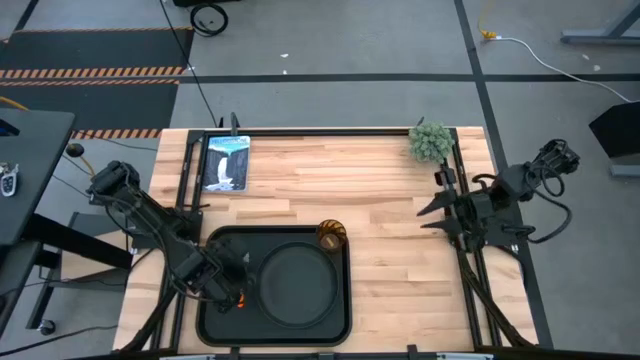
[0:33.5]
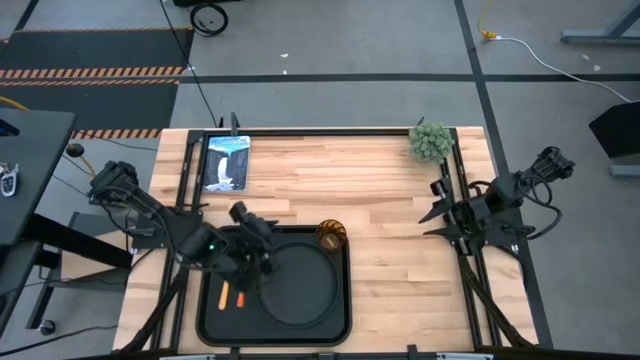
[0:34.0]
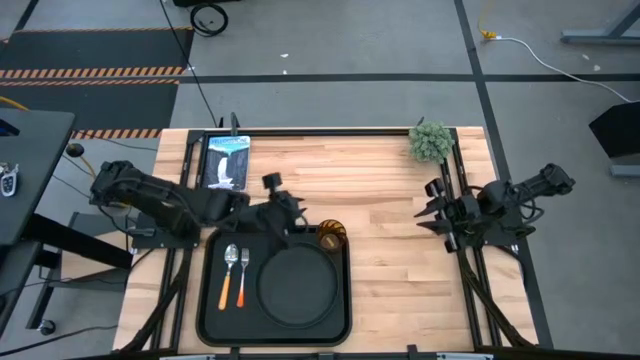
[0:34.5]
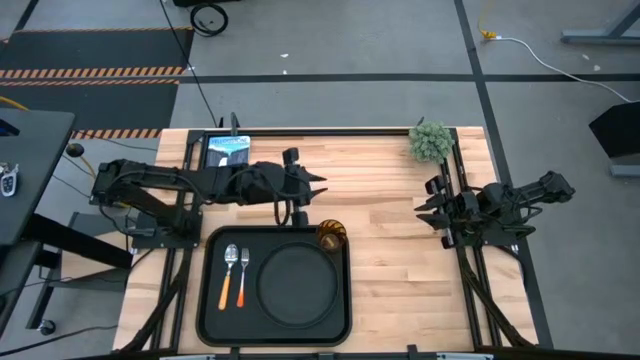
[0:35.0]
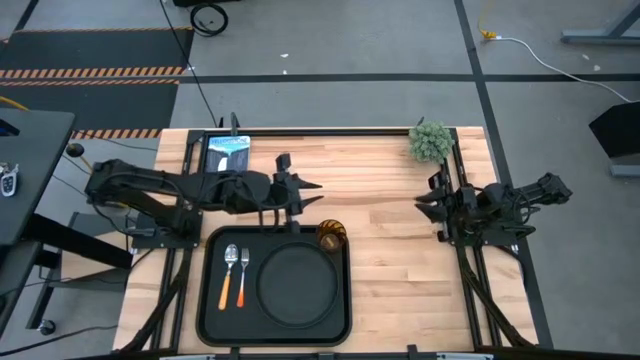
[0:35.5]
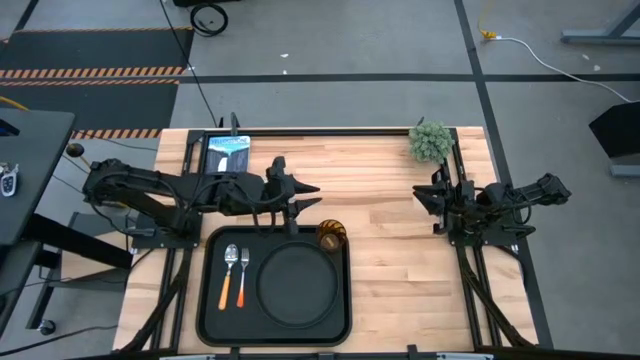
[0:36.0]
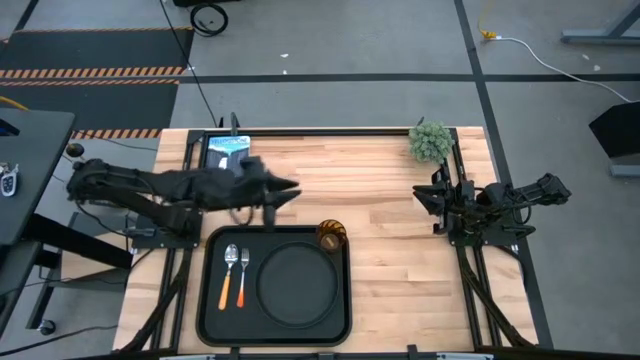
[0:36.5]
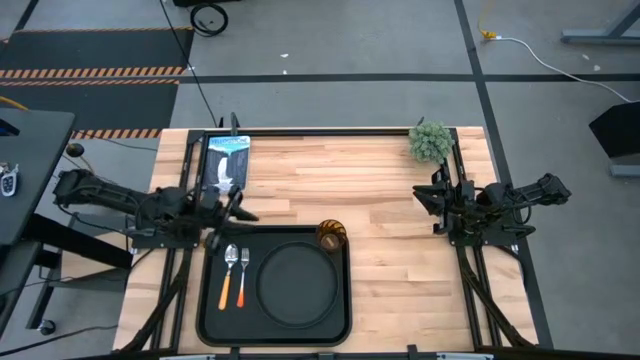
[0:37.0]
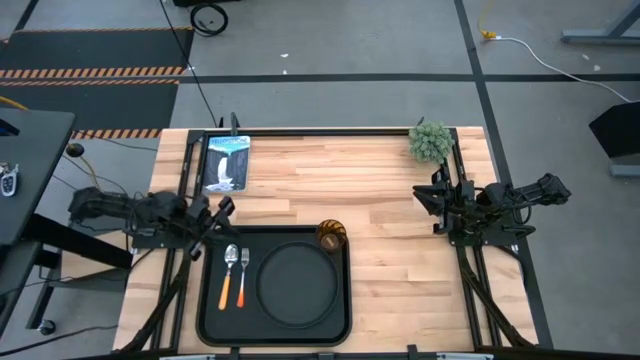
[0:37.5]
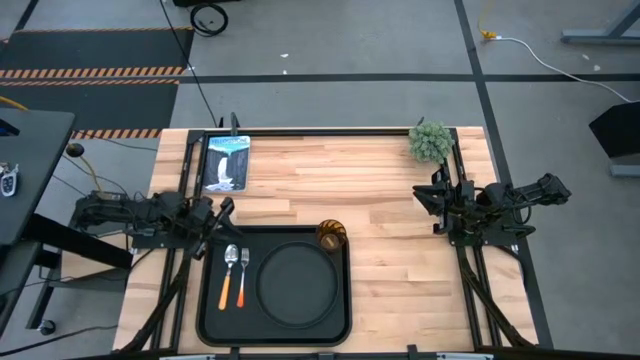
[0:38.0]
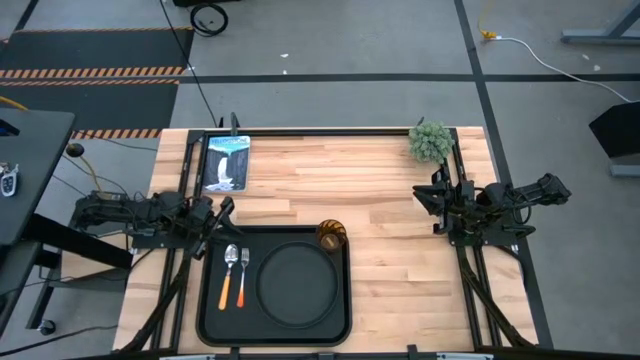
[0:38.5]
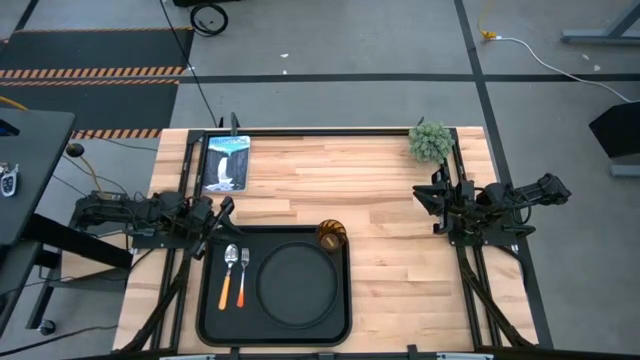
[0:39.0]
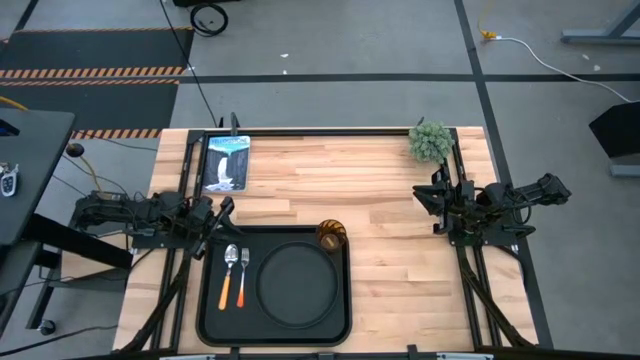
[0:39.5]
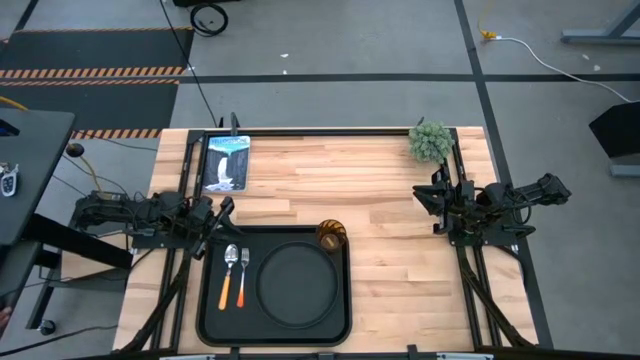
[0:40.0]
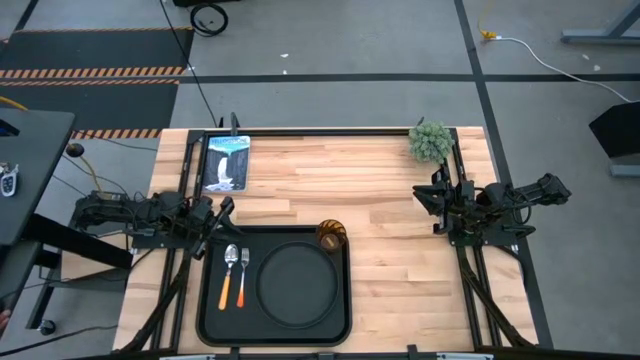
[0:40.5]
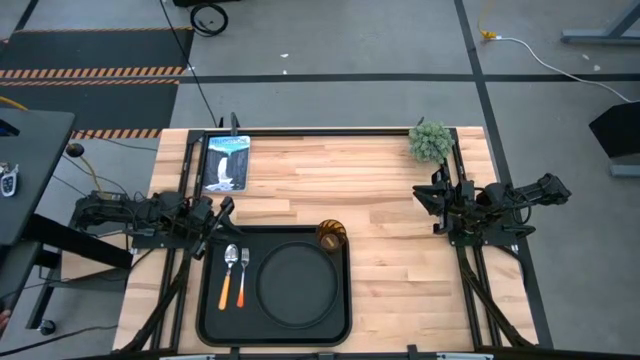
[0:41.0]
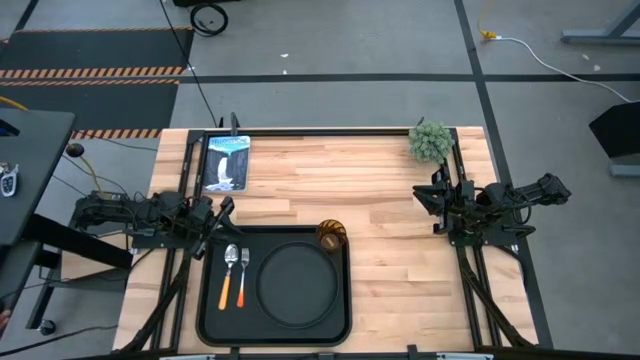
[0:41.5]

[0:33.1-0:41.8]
Task: Pick and place plate/cup/fork/spoon on tray
Return to Home Position

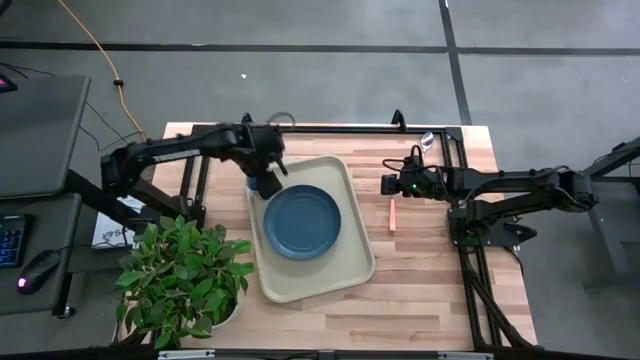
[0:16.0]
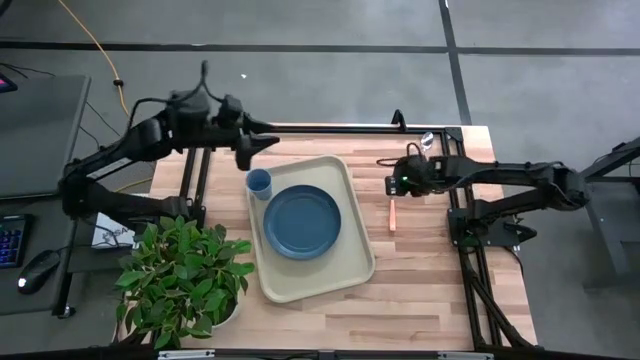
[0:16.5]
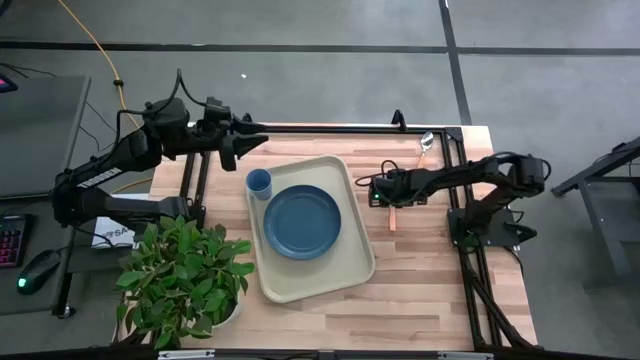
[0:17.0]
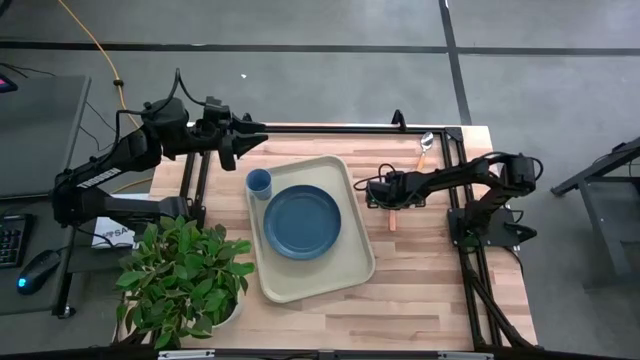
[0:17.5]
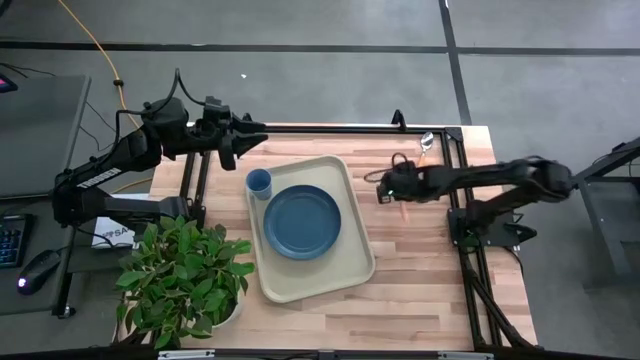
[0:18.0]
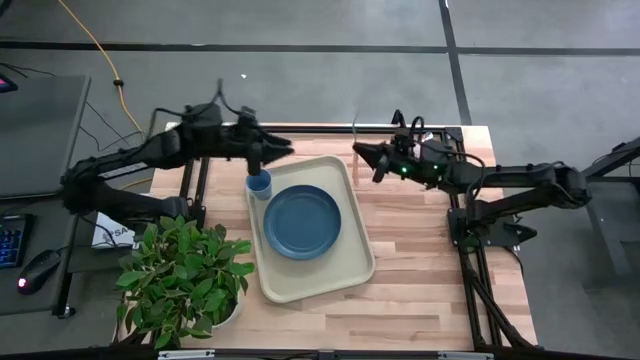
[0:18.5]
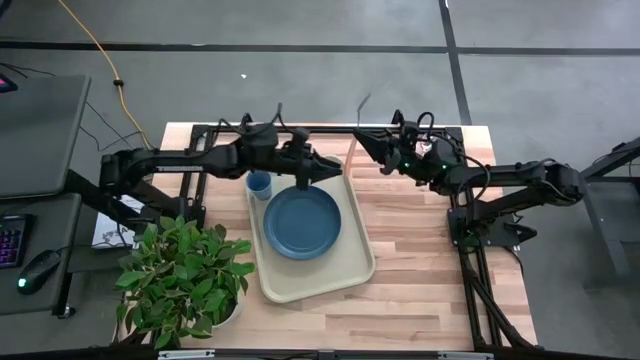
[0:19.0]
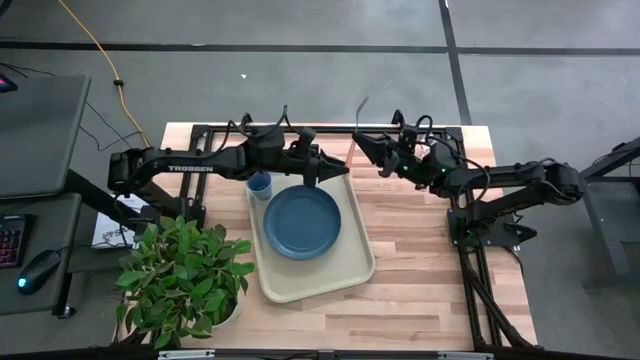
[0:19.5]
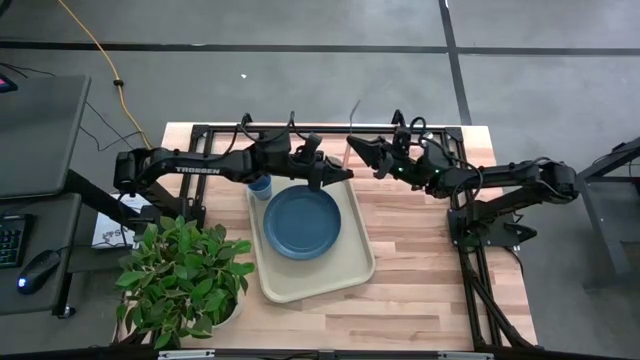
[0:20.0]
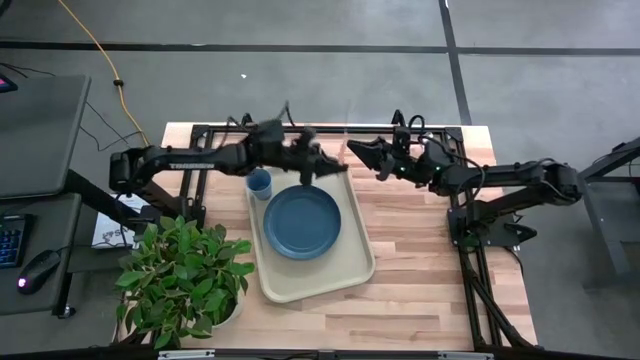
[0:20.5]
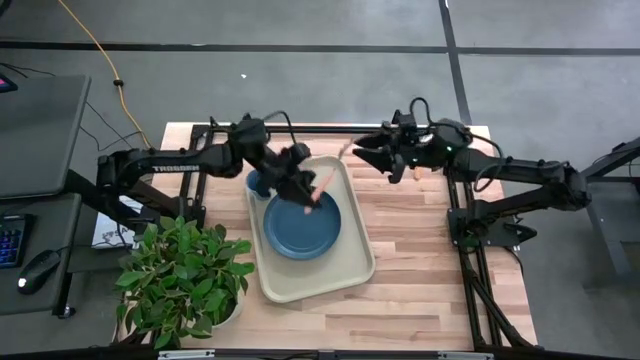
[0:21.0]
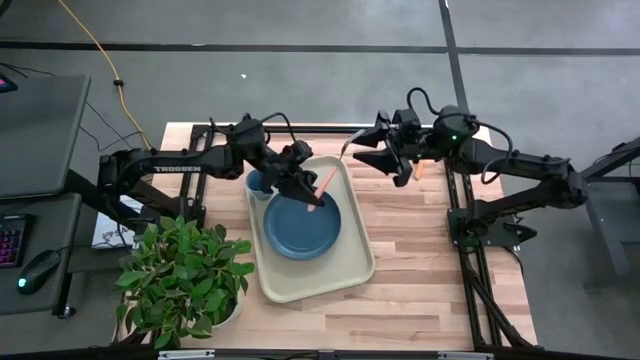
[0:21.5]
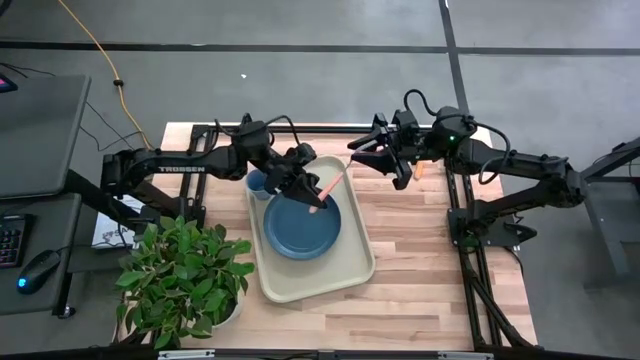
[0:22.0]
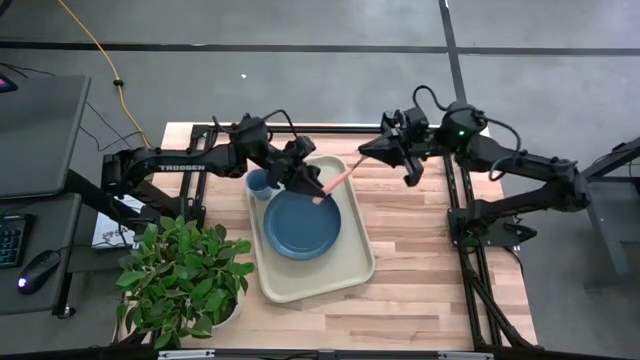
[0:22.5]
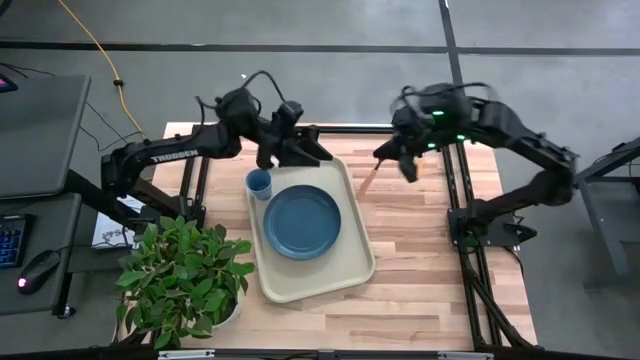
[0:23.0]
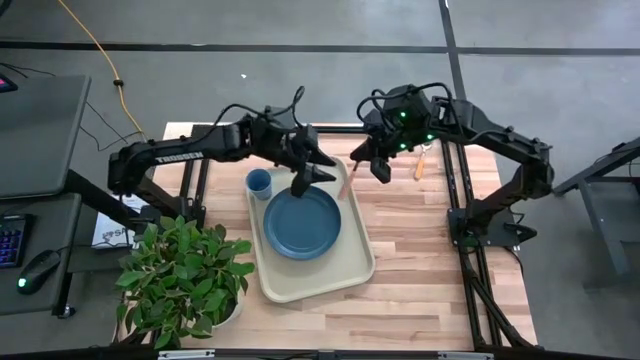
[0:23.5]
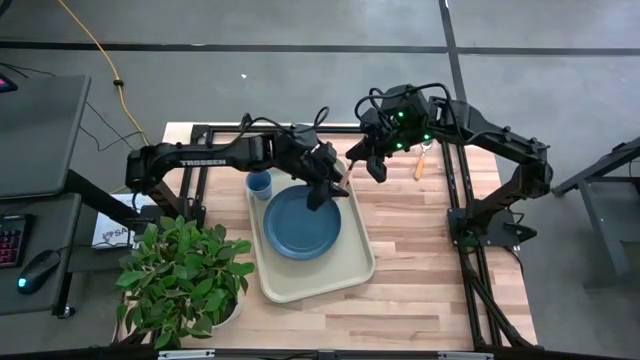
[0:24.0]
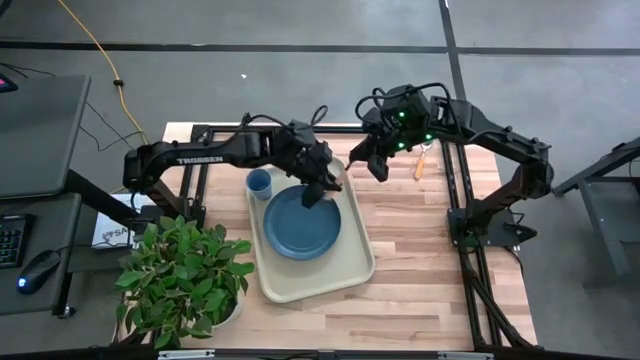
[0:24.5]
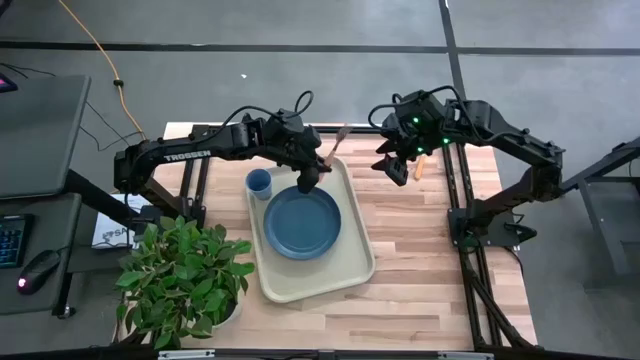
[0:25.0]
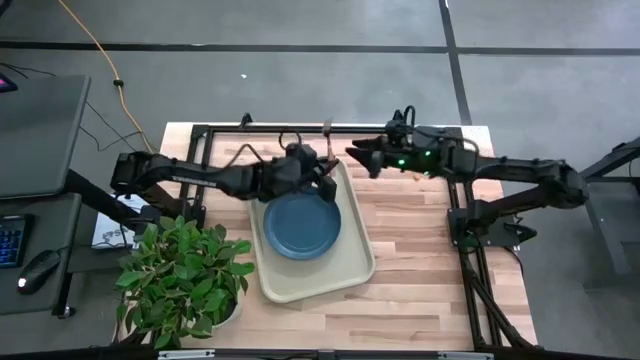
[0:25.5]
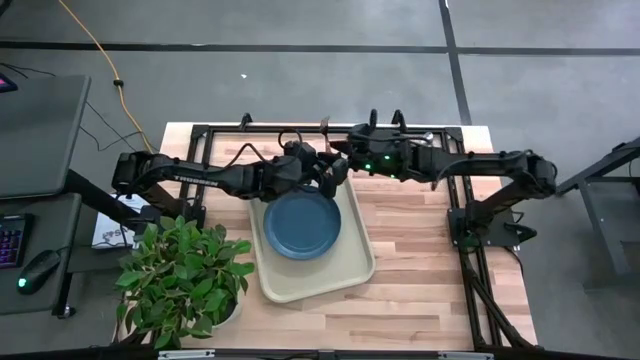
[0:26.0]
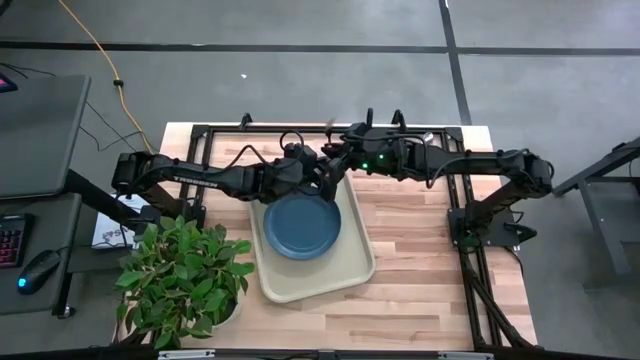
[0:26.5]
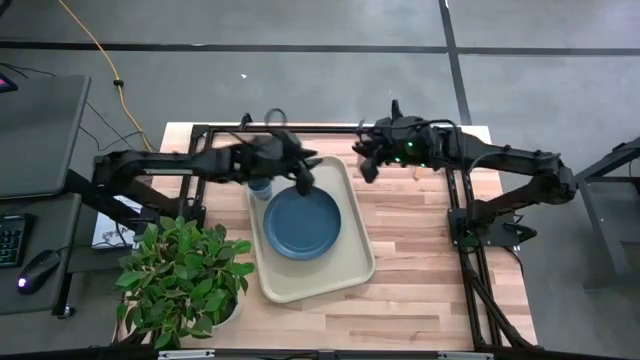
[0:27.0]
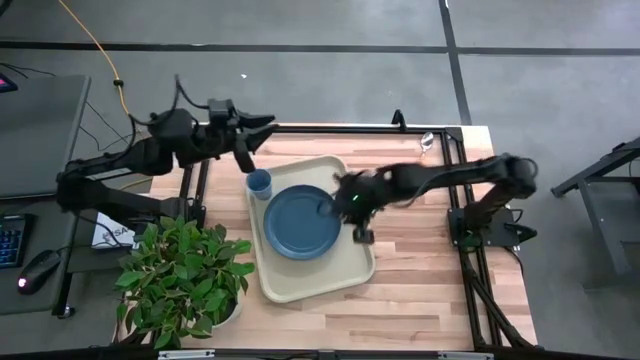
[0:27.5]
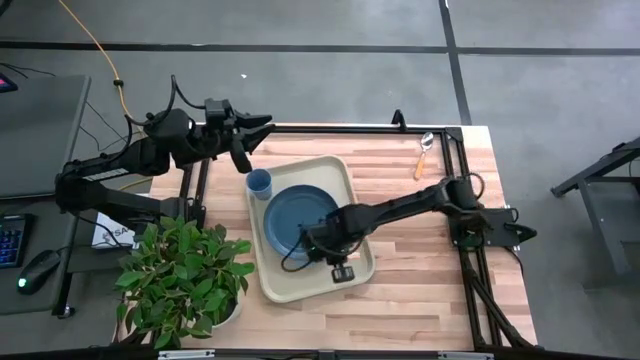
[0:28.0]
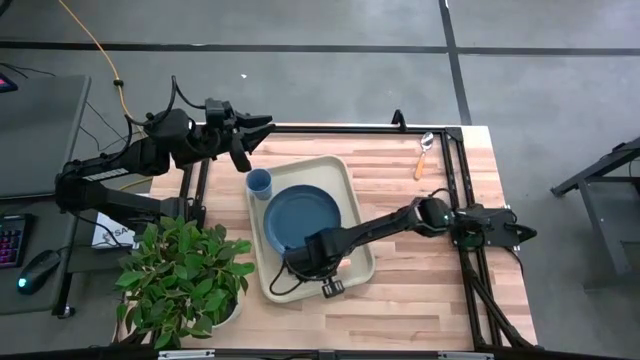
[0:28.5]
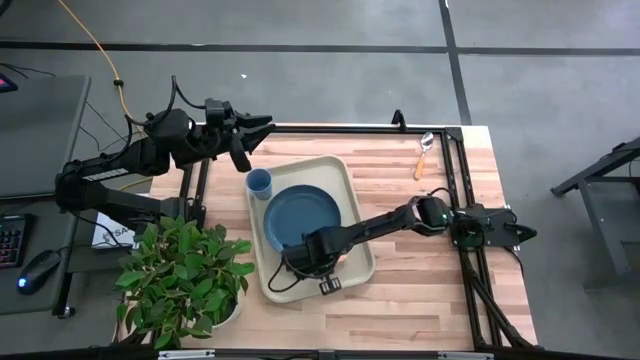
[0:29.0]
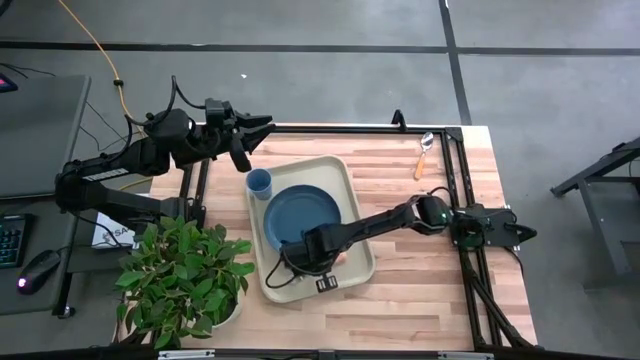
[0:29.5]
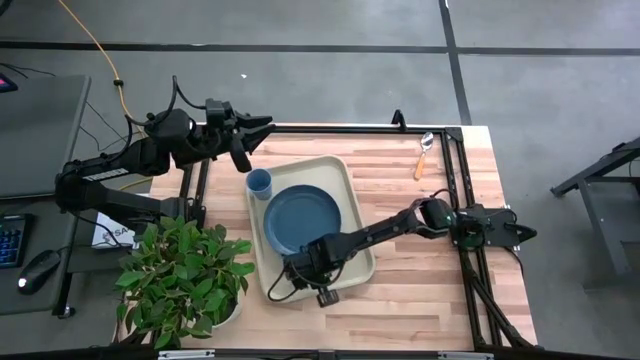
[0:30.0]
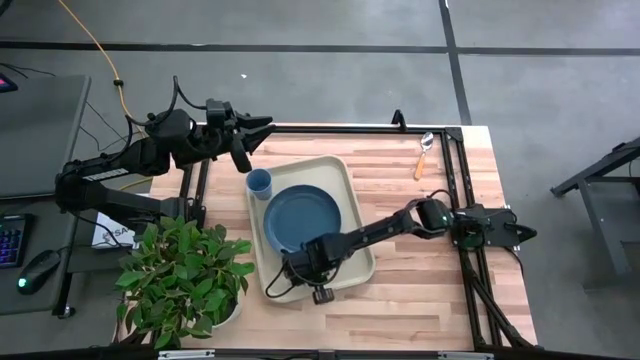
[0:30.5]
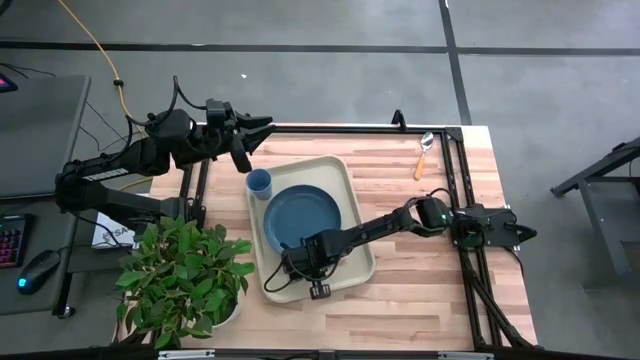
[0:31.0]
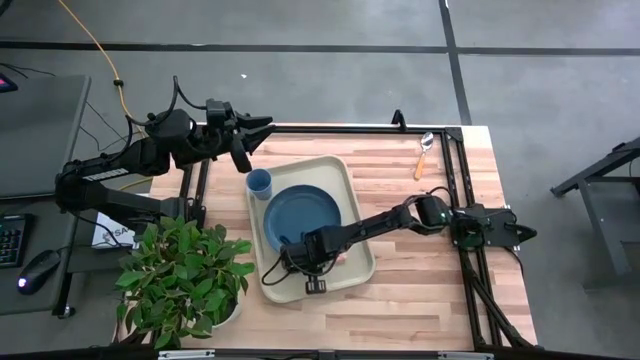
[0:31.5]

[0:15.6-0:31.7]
Task: Pick and place plate/cup/fork/spoon on tray
Put the orange fork on the white serving tray to the left of the blue plate
